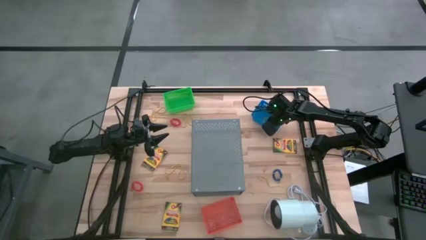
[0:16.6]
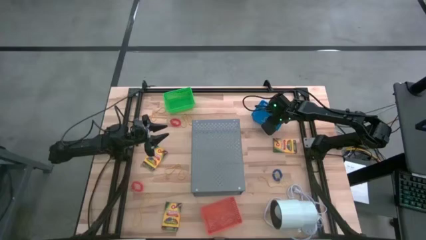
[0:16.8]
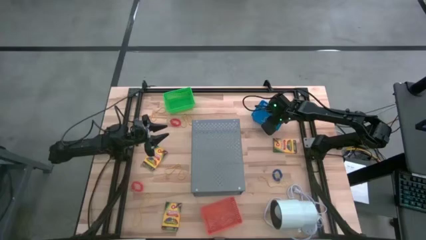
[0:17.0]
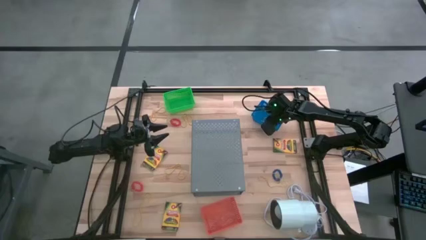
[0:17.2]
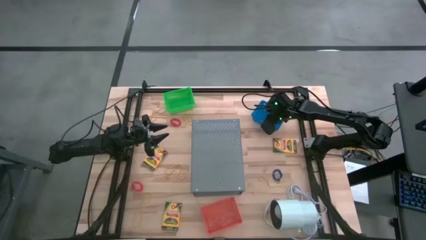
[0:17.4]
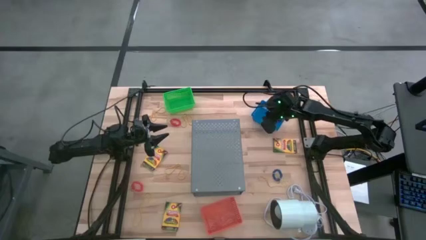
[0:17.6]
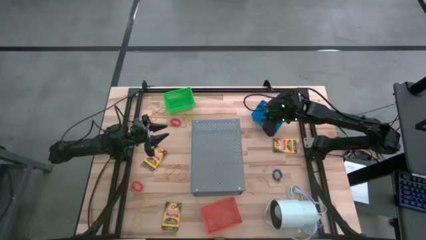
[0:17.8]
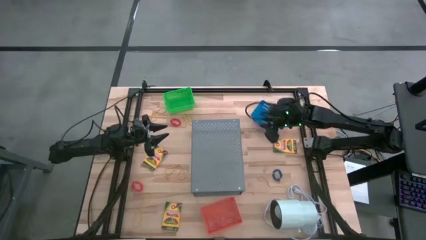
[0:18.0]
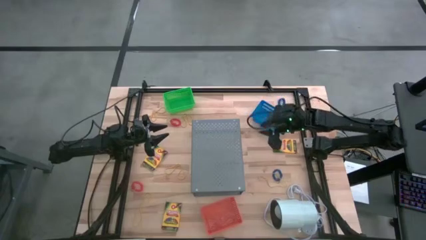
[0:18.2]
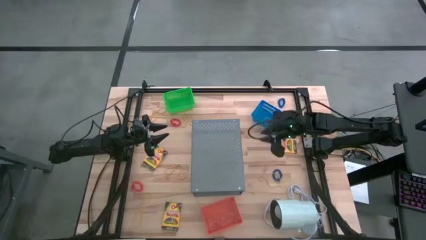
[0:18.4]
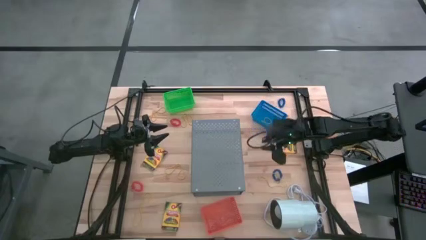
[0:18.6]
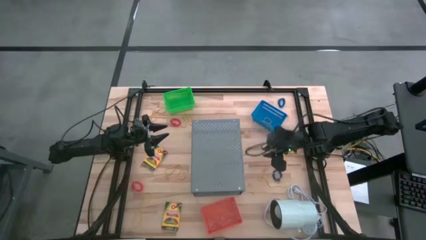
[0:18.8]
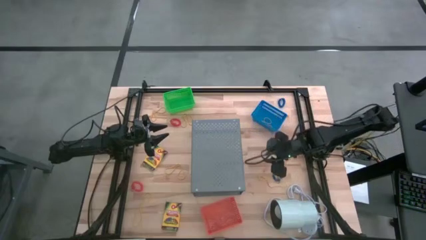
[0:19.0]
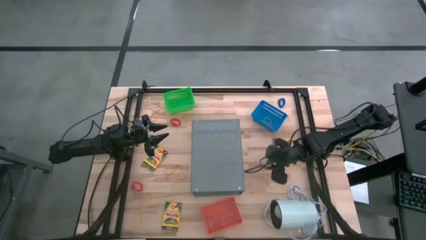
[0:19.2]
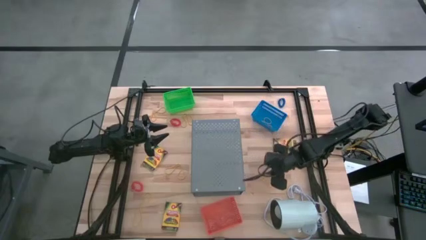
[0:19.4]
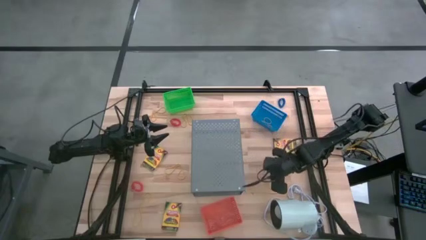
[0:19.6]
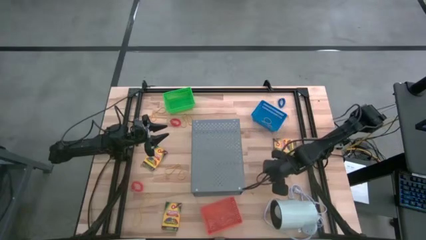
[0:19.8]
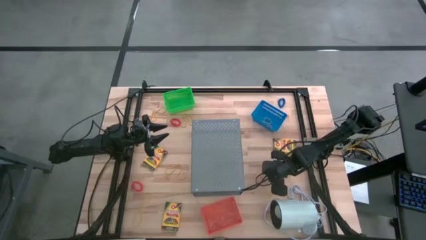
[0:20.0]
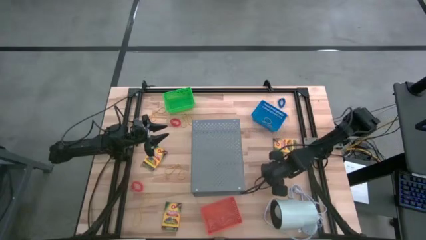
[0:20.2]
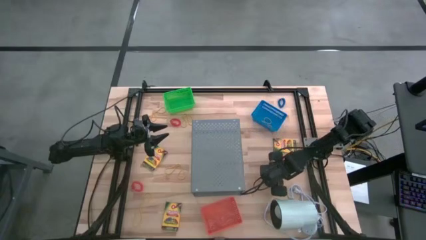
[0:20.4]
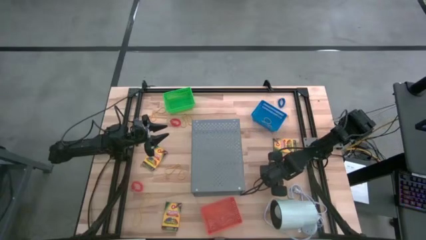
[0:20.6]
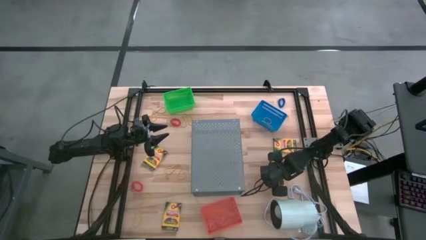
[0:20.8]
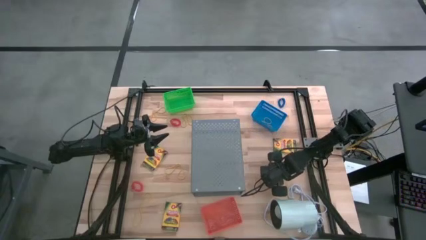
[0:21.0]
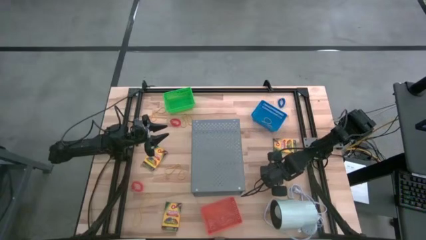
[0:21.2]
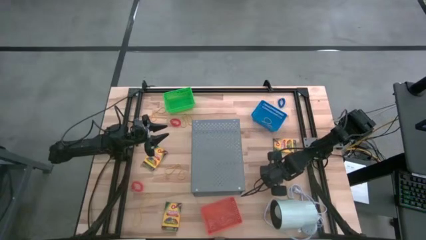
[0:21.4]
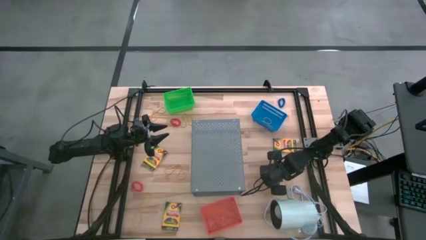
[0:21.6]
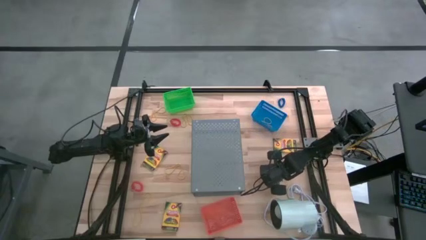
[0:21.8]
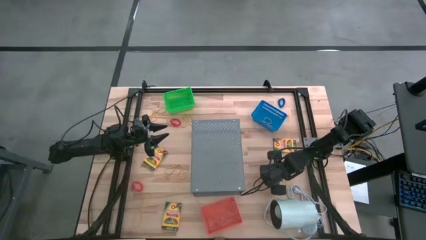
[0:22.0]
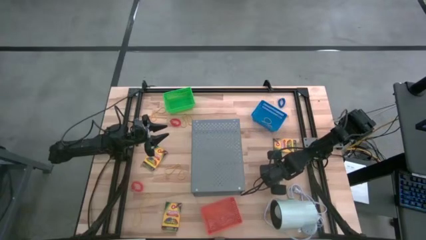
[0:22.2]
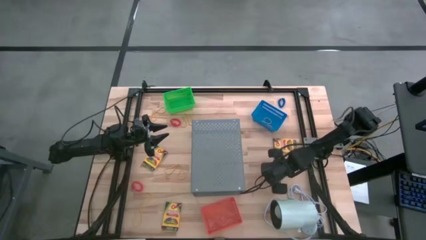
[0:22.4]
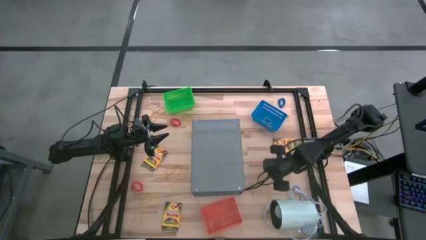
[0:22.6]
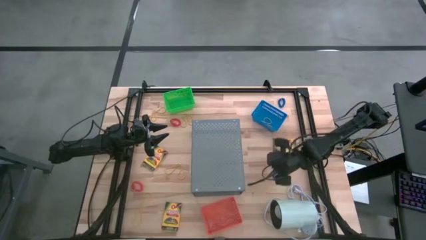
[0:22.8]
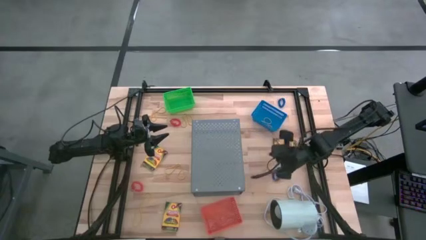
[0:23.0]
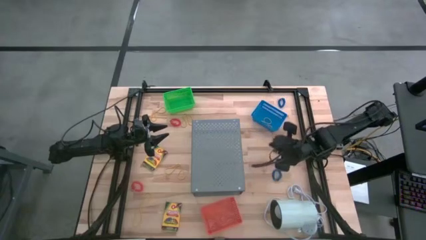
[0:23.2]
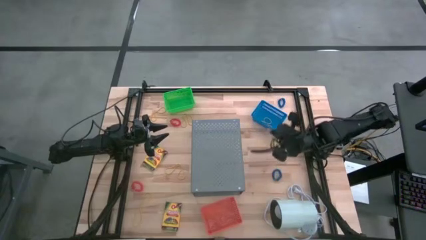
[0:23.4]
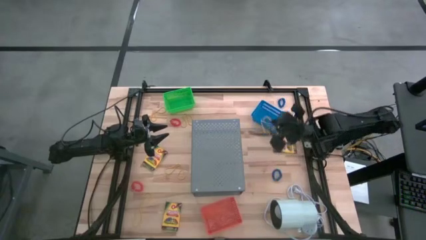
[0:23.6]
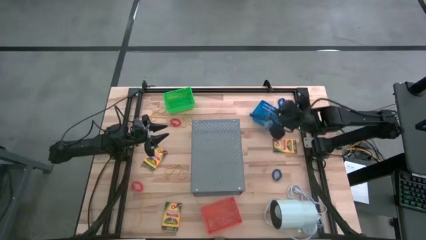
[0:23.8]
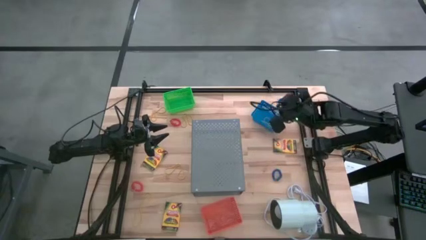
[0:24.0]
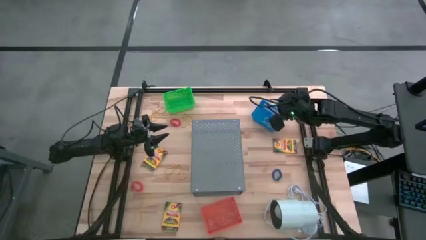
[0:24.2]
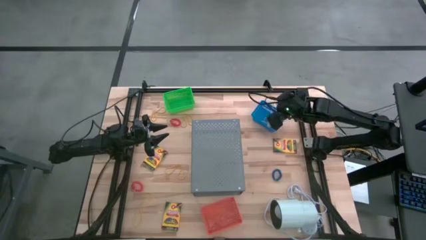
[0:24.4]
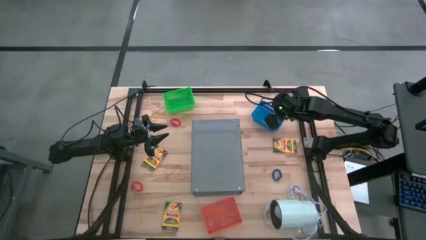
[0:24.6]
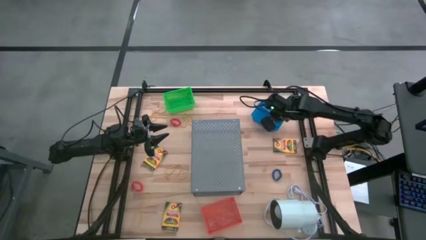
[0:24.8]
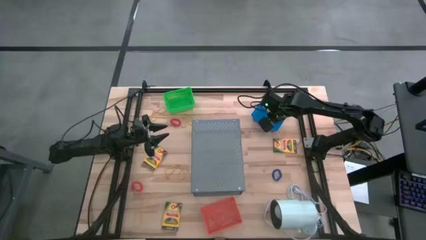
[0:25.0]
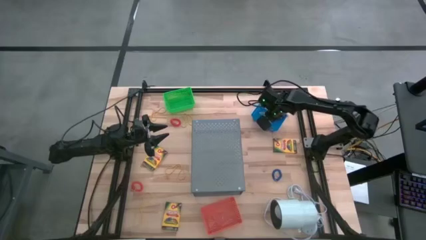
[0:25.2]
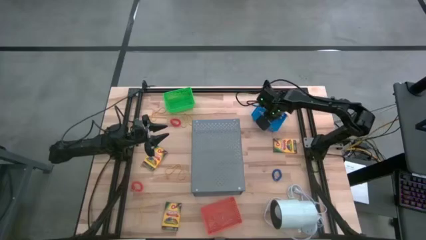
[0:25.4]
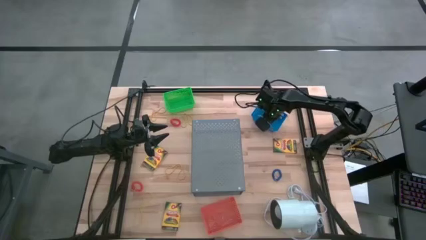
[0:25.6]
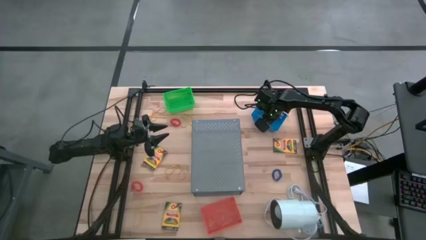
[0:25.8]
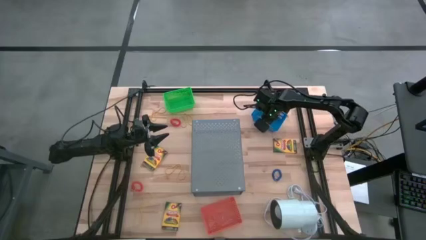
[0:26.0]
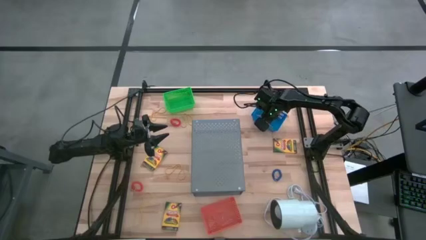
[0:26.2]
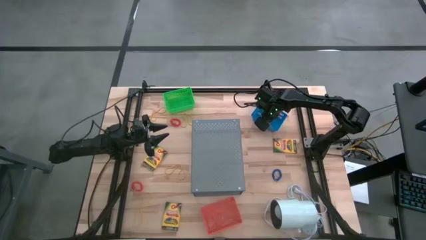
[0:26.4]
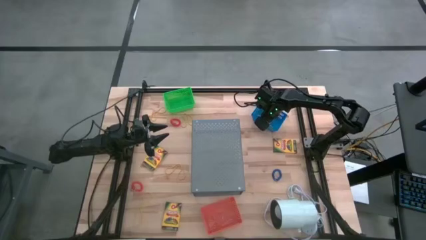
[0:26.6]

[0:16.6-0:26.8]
Task: Pick & Place Office Desk Supplies
Put the yellow rubber band into the blue basket

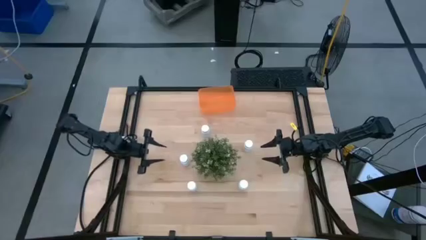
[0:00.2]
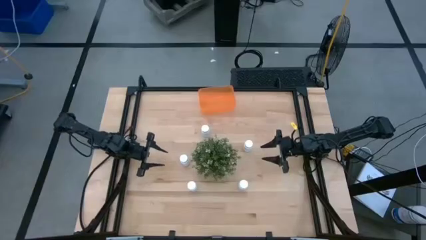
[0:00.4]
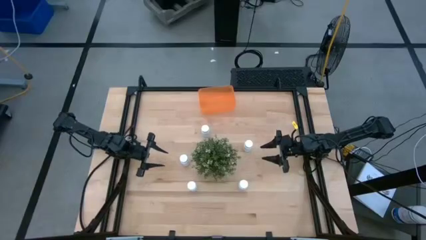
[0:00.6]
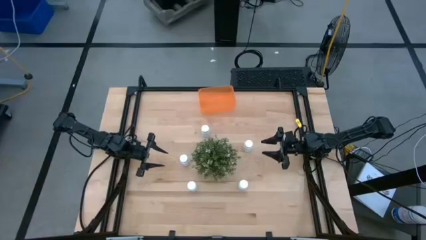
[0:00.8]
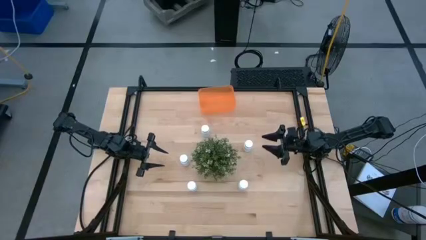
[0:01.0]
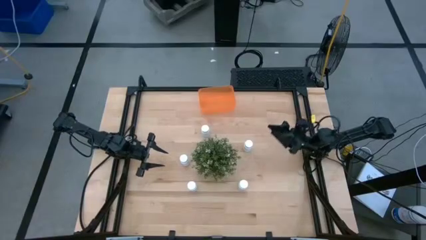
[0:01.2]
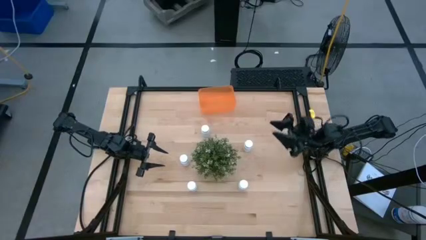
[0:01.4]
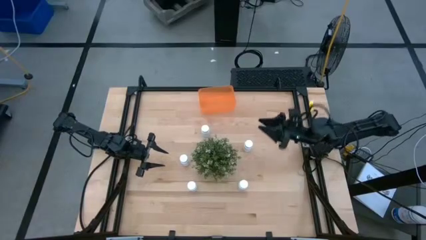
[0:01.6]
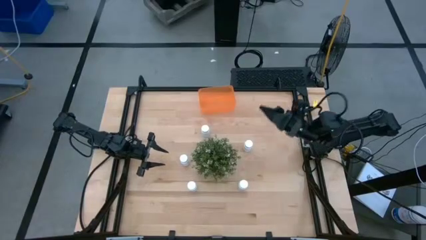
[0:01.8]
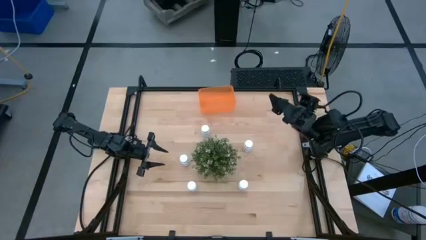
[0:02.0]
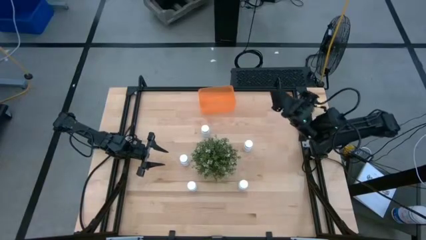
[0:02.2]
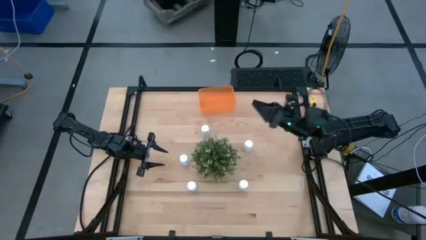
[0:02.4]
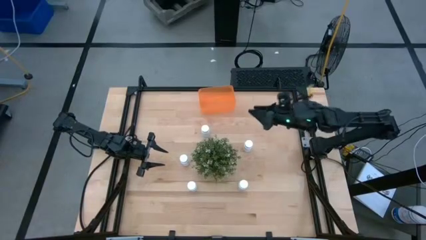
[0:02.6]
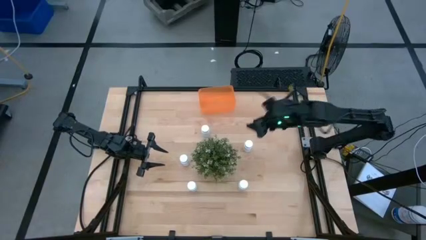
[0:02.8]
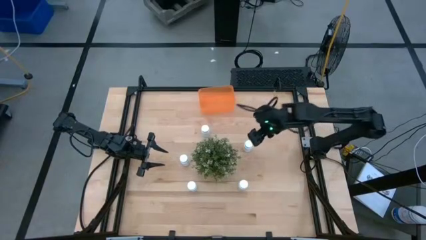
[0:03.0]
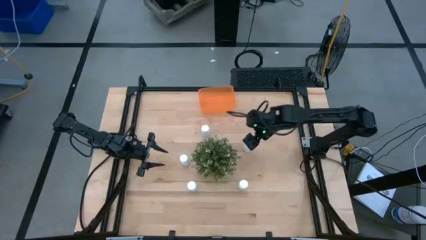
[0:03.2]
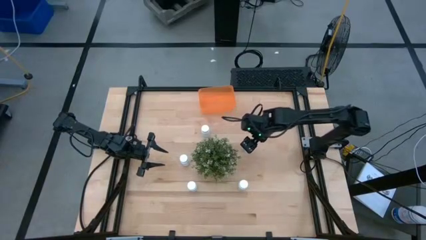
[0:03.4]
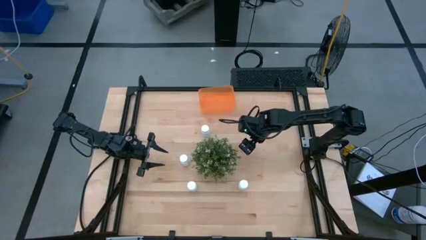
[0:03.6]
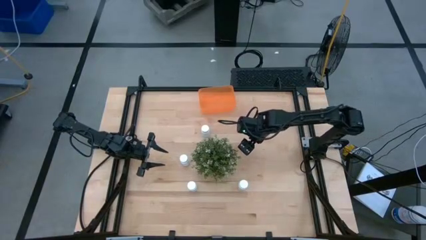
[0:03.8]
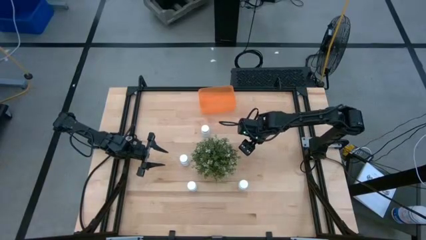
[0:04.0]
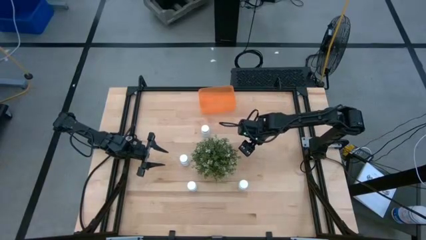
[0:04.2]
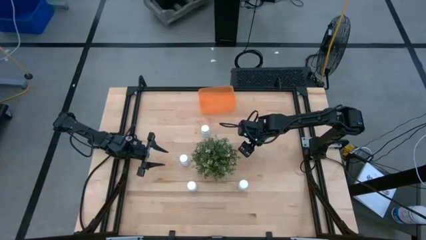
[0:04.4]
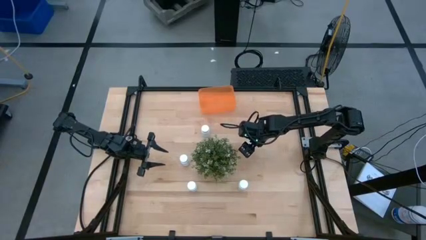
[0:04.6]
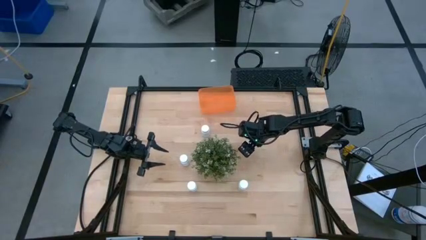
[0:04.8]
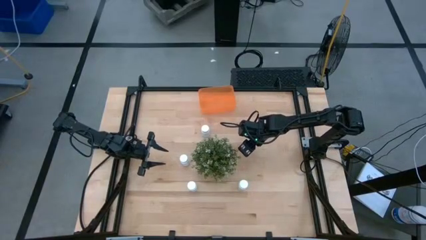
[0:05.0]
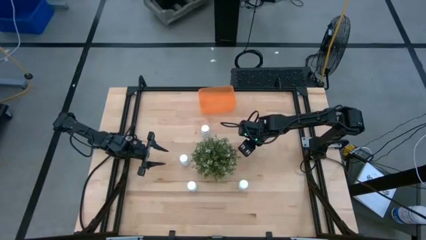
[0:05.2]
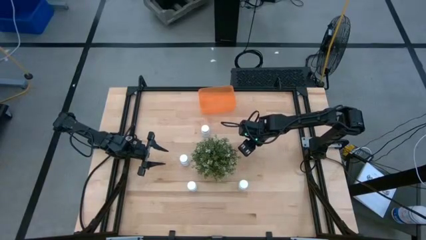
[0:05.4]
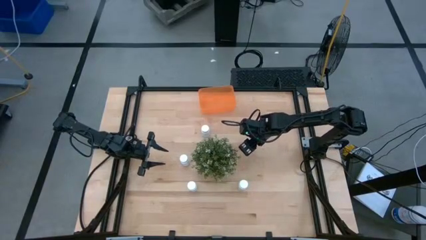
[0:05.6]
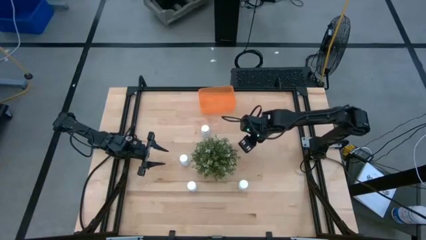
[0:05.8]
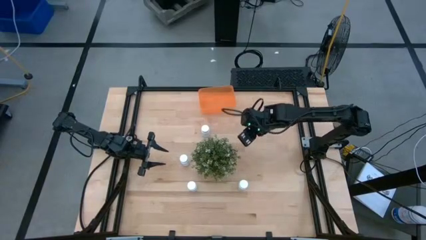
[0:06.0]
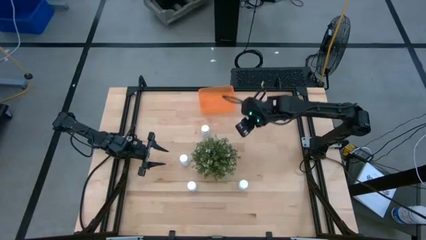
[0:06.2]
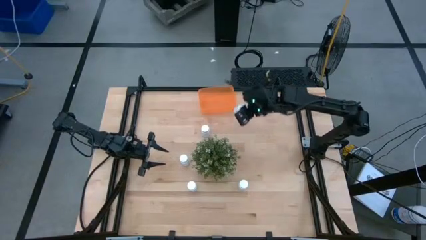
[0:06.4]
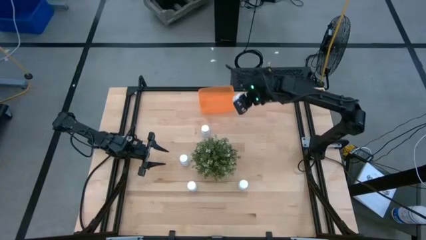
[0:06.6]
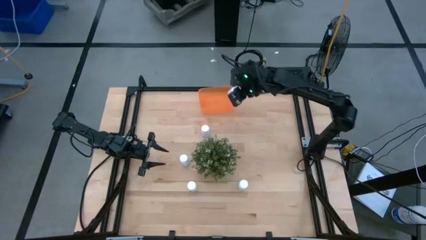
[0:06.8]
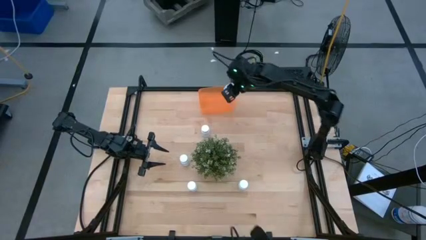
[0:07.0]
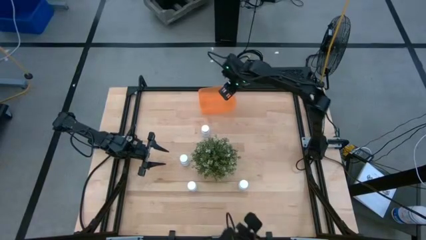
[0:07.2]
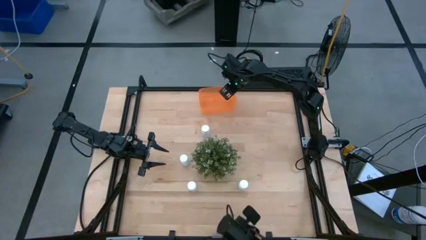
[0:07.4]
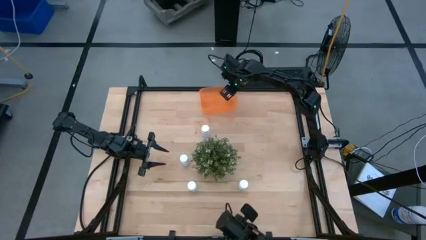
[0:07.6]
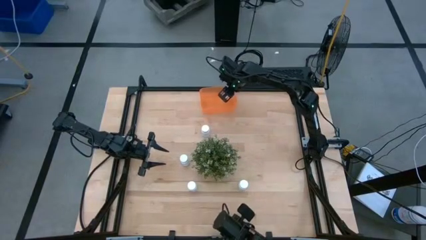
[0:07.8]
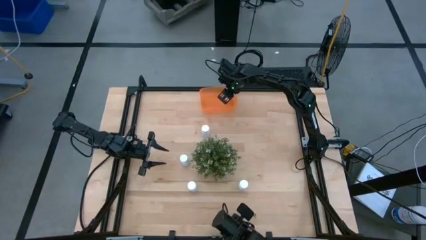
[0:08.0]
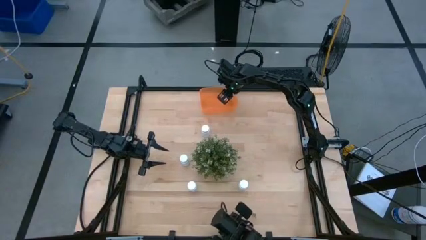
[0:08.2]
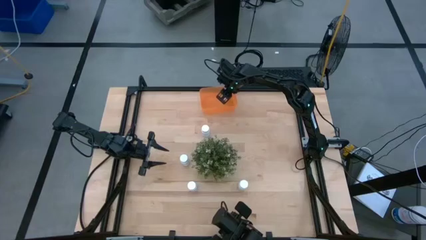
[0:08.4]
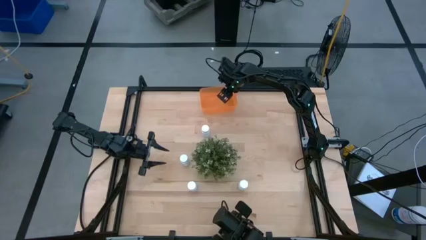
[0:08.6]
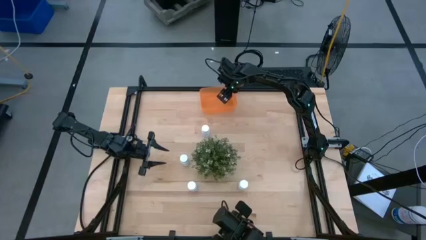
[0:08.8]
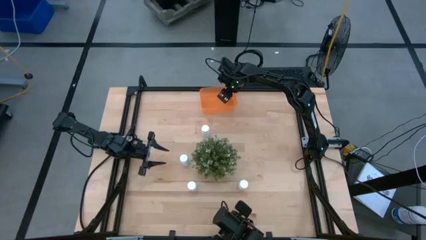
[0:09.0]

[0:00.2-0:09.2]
Task: Pick and place pill bottles into a basket
Put the white pill bottle into the orange bin
